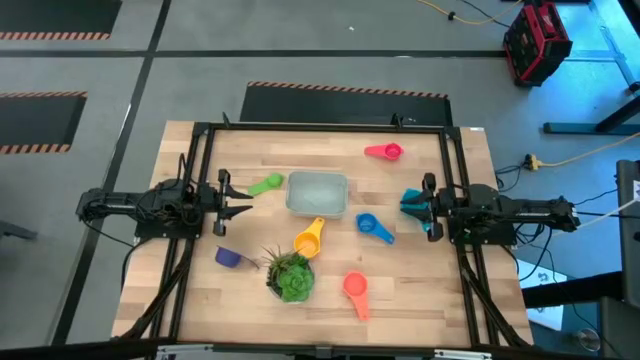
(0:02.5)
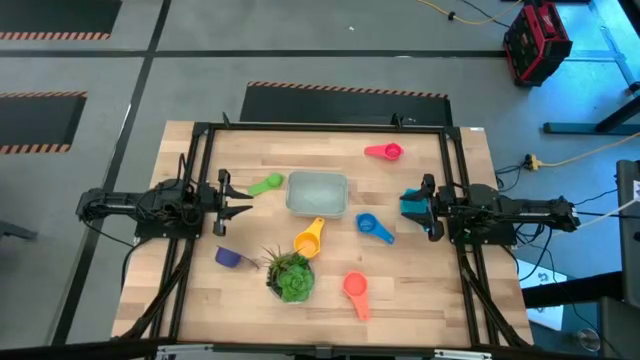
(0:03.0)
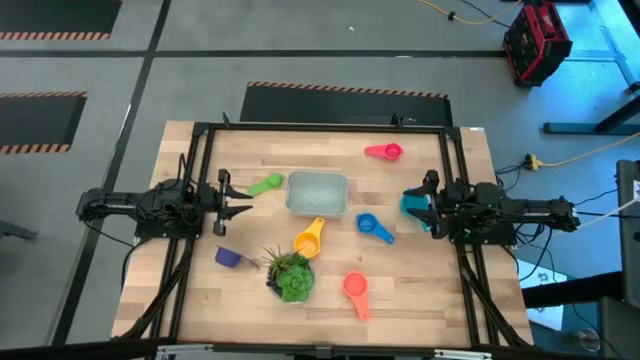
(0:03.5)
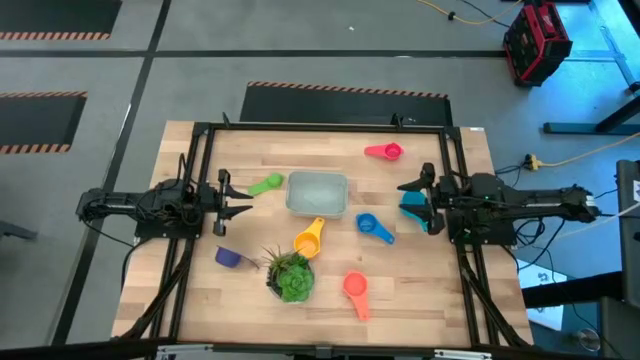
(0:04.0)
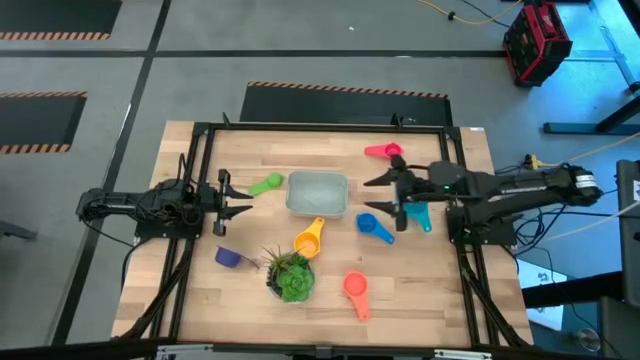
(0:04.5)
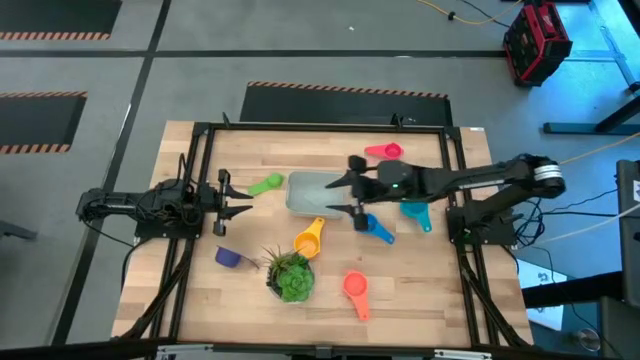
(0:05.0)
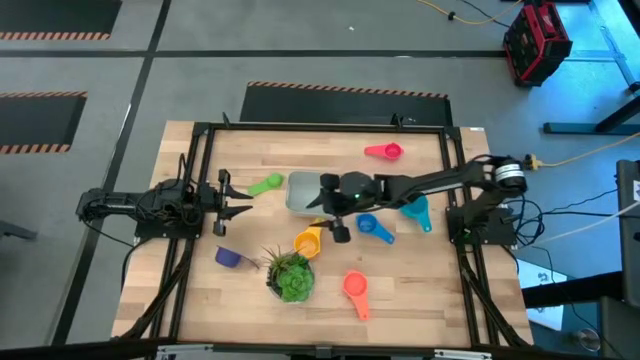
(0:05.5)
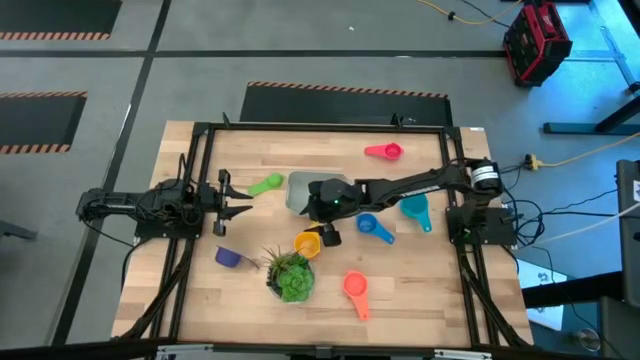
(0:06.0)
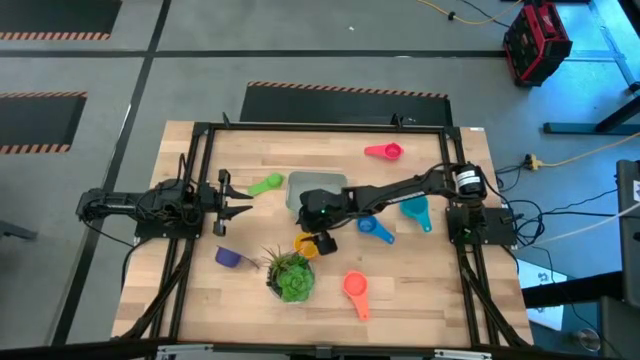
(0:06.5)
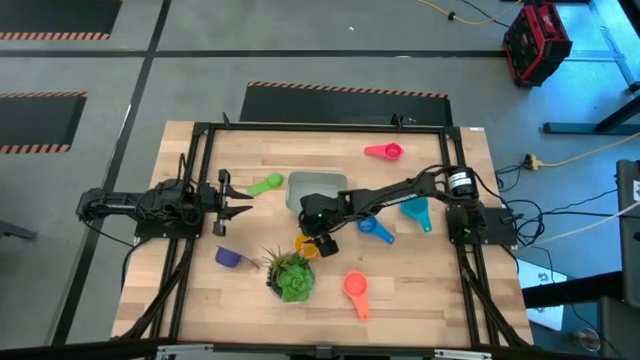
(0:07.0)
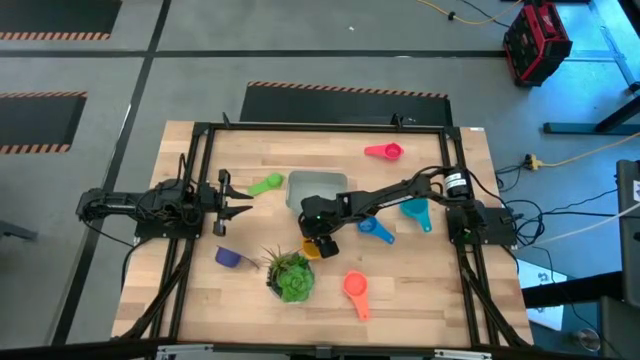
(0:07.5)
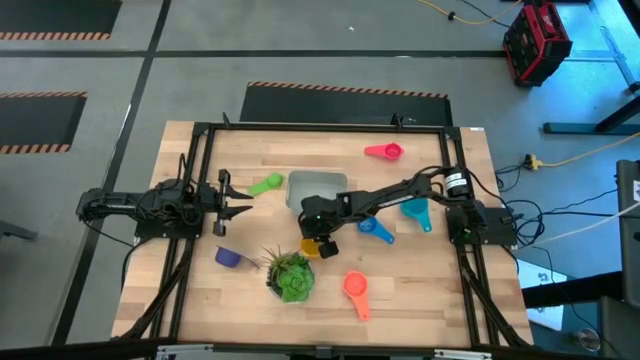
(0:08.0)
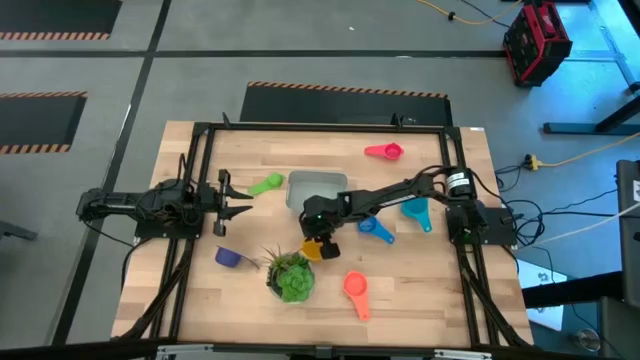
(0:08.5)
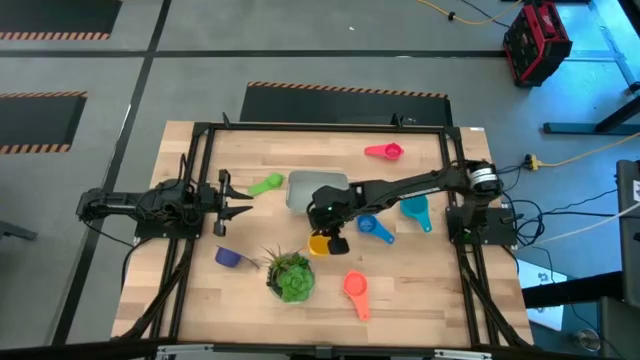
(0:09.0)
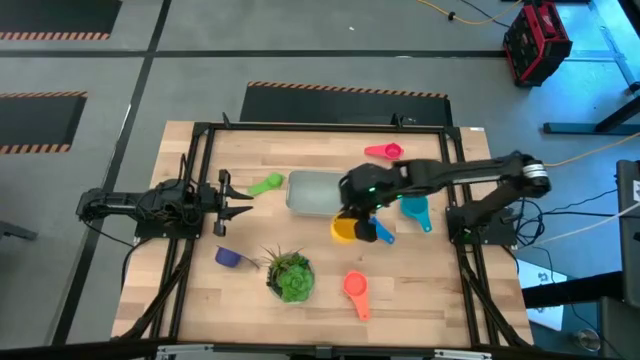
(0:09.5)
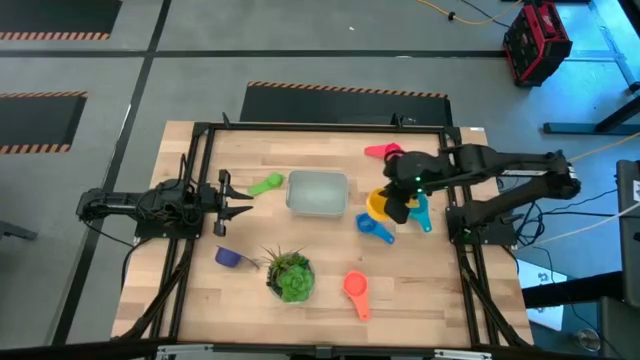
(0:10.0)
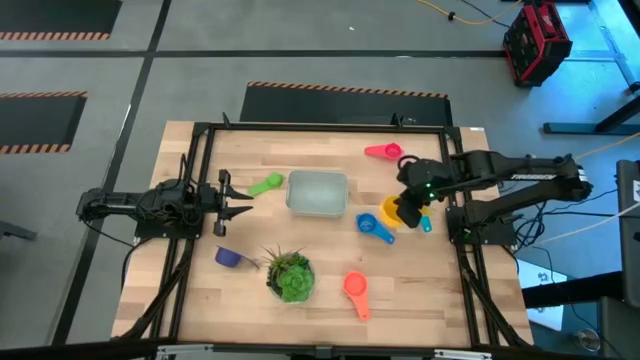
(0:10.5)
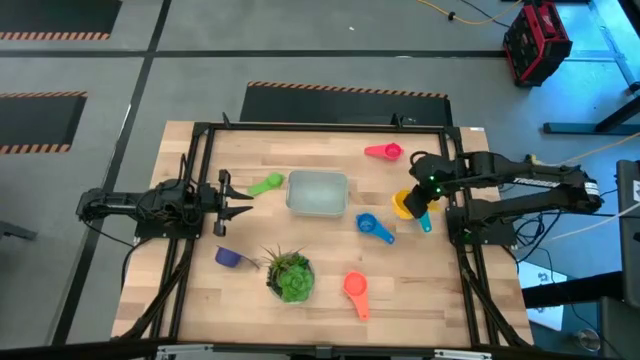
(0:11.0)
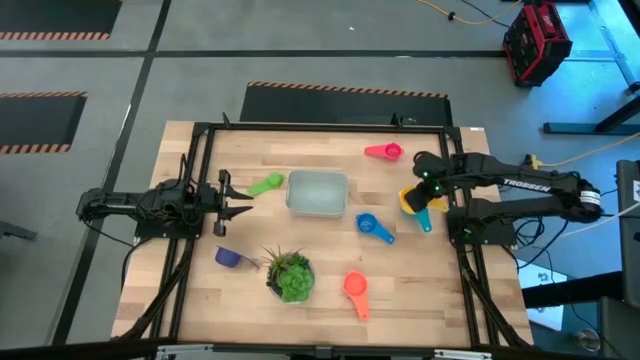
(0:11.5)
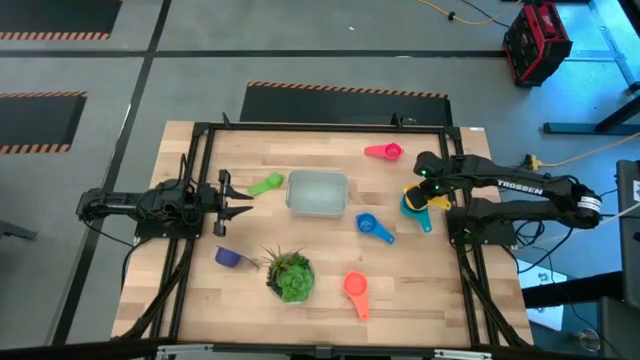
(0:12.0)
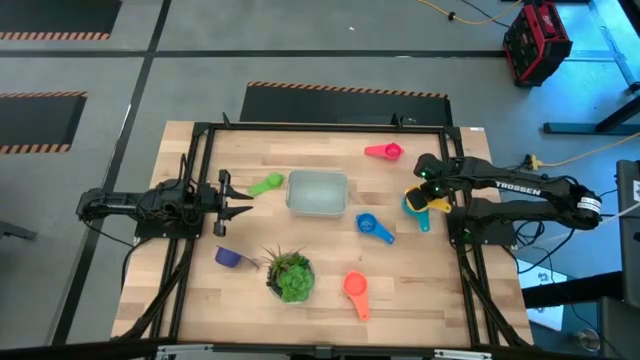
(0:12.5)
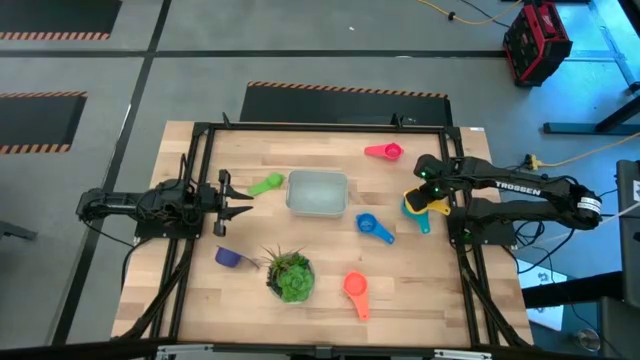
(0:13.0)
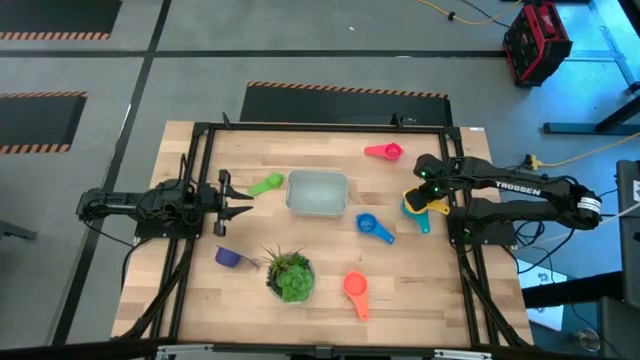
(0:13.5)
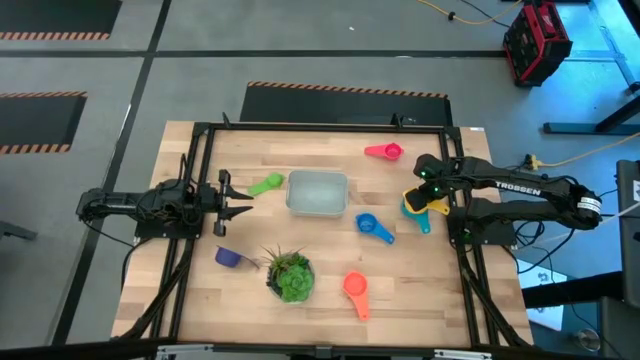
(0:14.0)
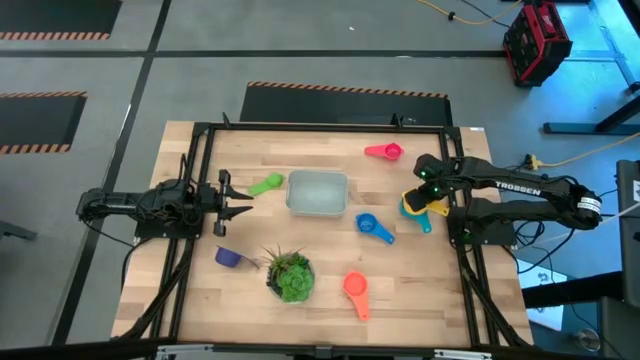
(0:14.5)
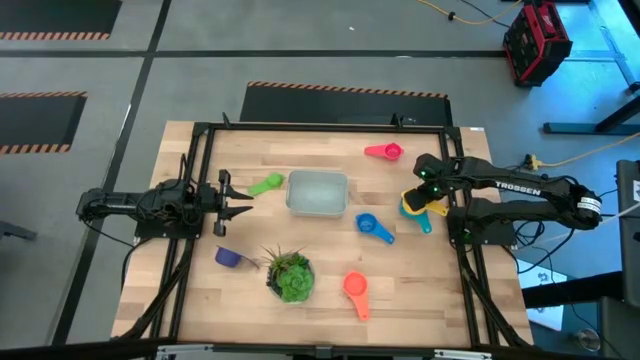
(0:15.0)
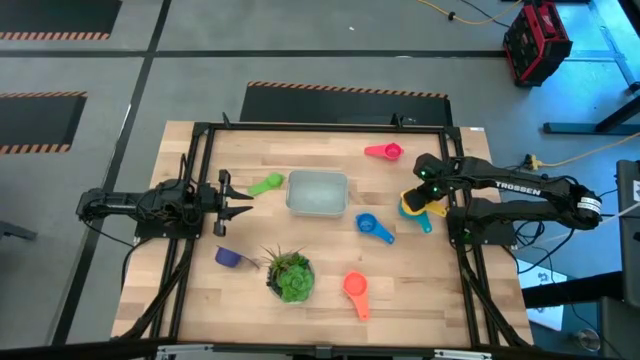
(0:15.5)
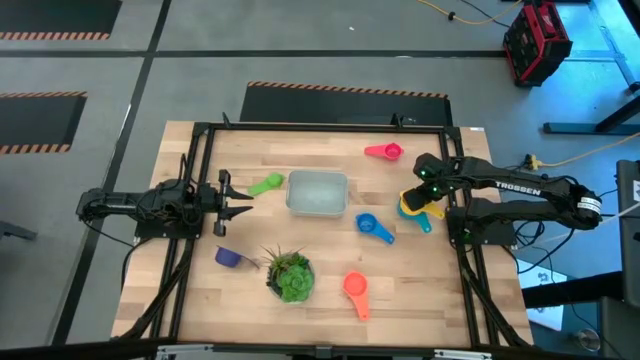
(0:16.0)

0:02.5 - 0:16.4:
Task: Nest measuring cups in basket
Stack the yellow measuring cup on top of the the light blue measuring cup

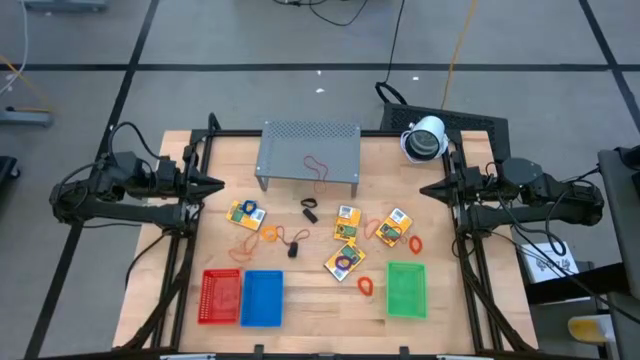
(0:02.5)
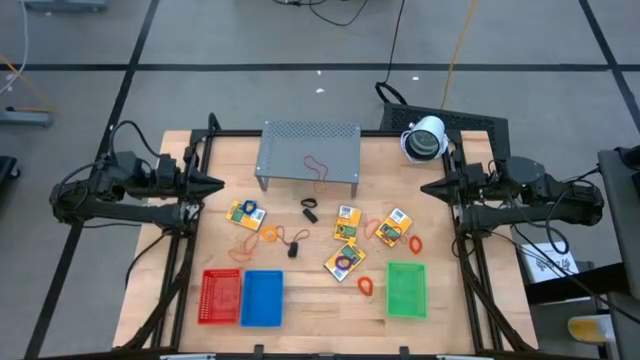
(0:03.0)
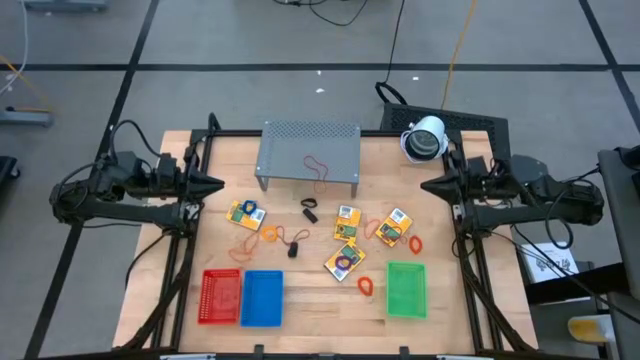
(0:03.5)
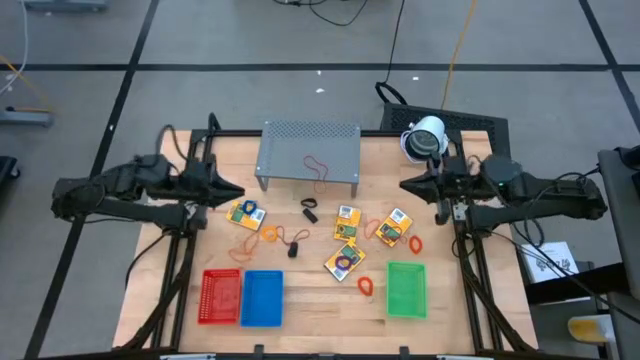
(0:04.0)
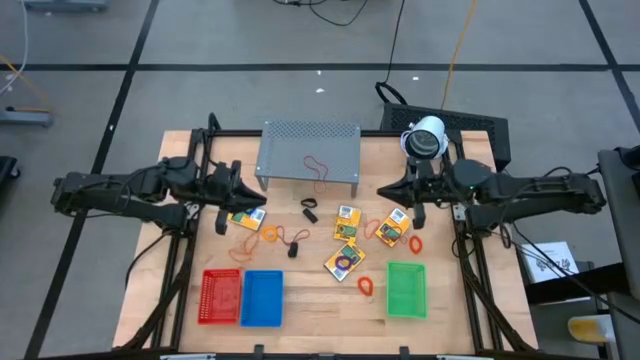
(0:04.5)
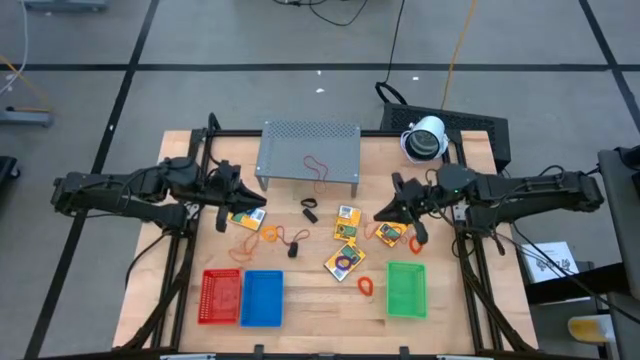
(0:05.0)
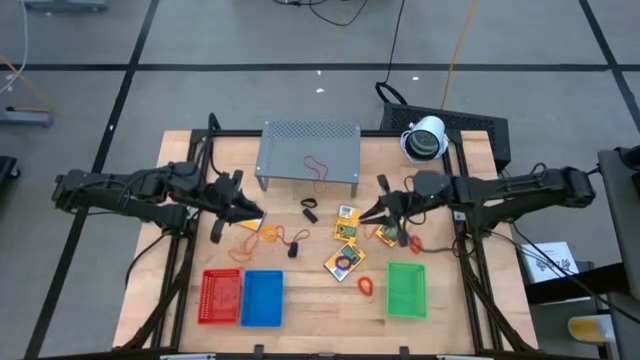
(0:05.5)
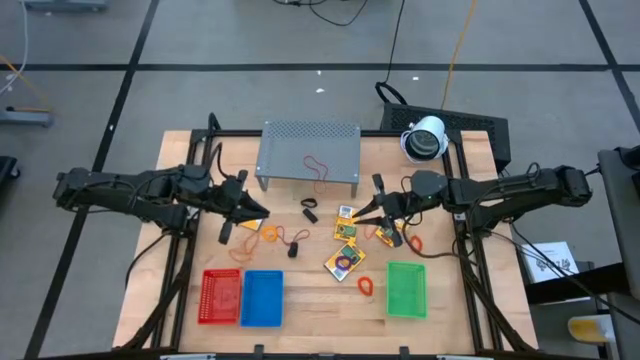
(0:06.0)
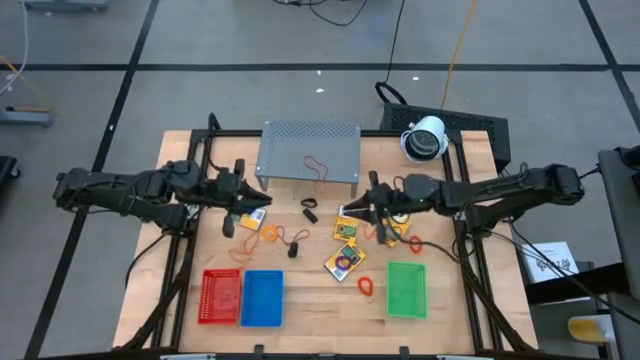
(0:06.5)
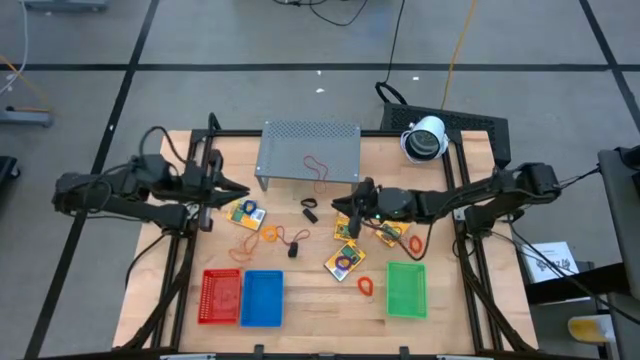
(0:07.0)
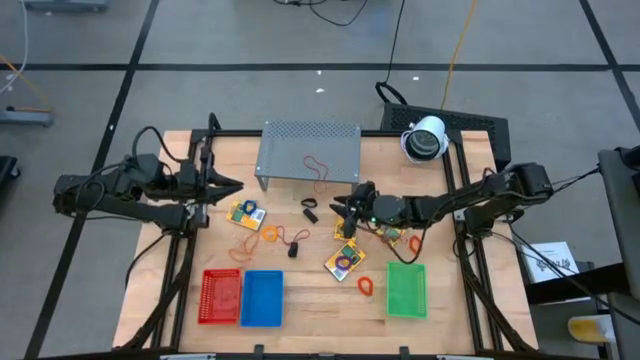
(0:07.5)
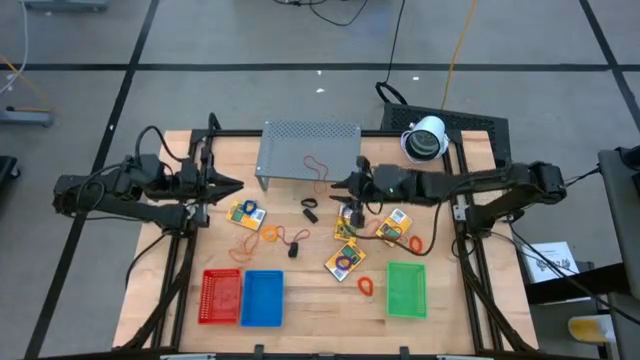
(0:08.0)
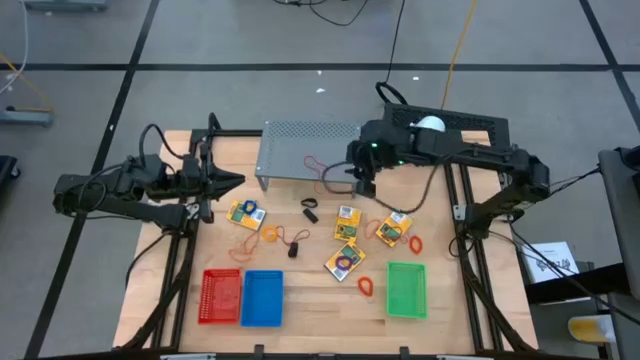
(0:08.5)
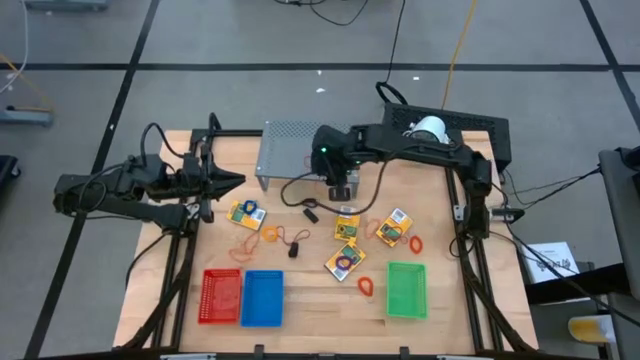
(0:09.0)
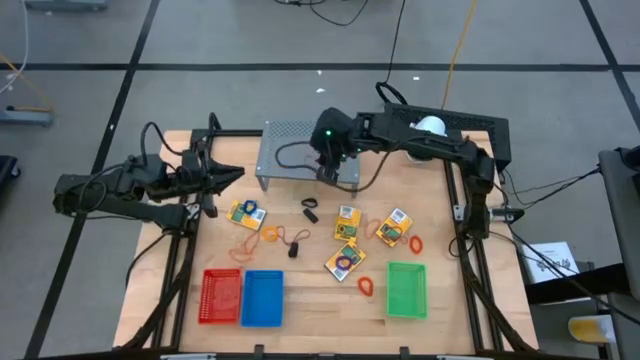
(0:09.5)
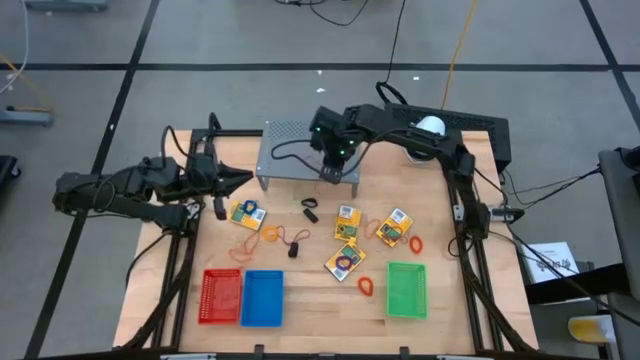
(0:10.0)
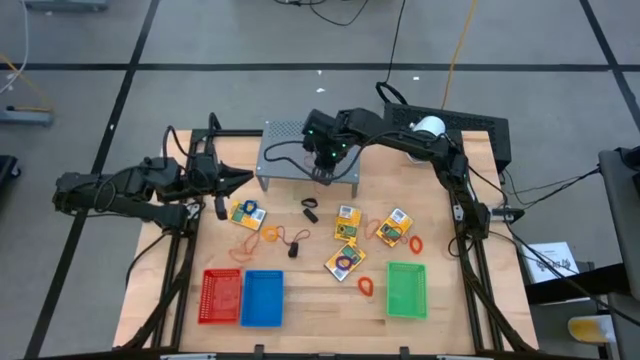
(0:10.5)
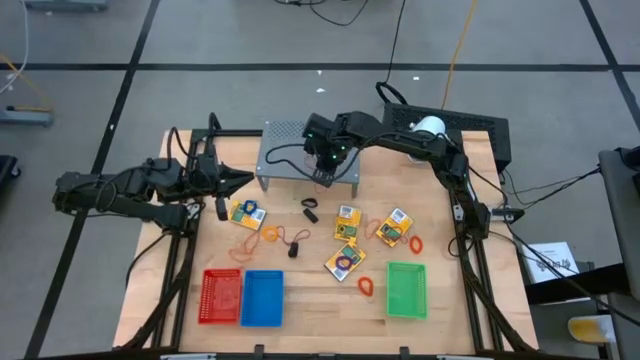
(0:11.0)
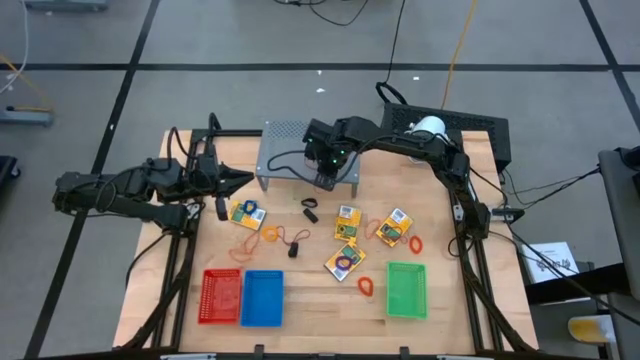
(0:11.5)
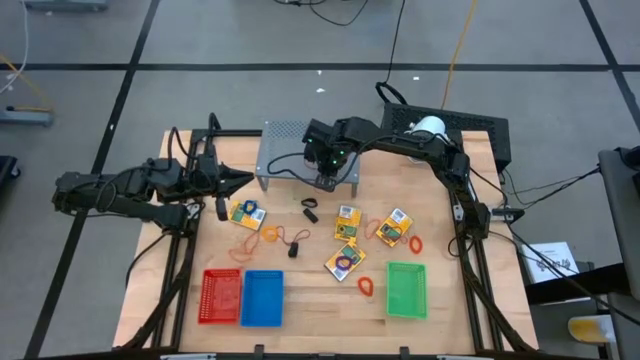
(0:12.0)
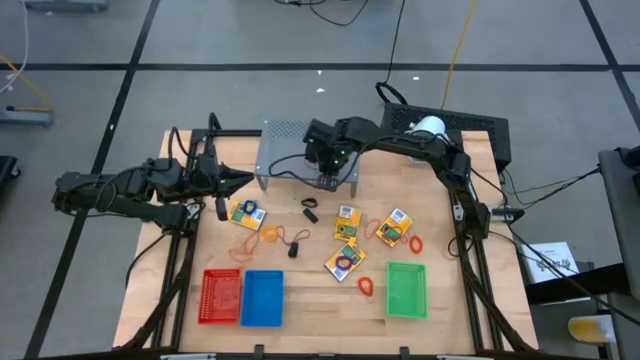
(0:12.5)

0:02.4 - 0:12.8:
Task: Pick & Place Office Desk Supplies
Put the red rubber band into the blue bin
